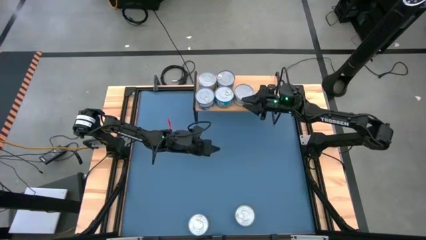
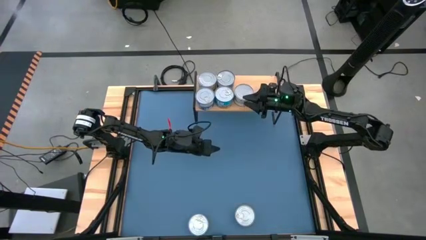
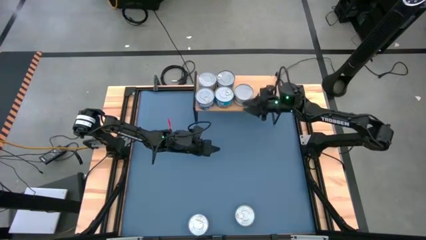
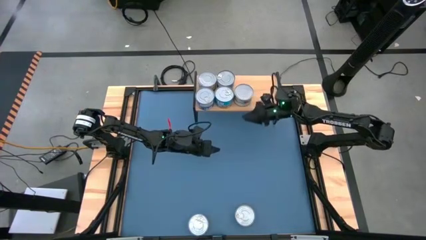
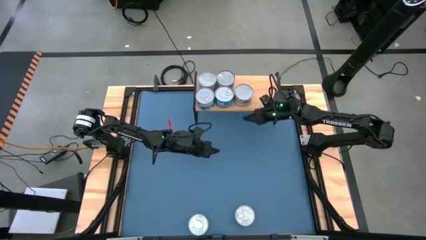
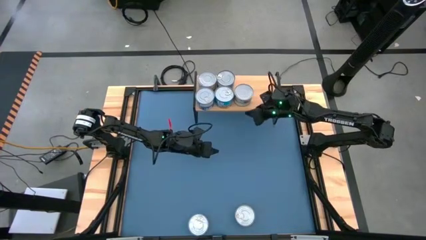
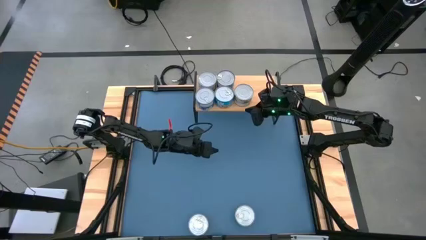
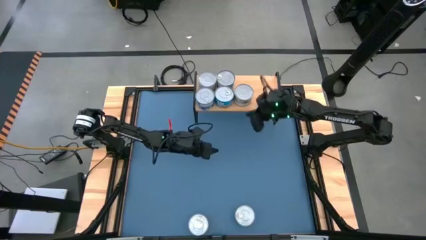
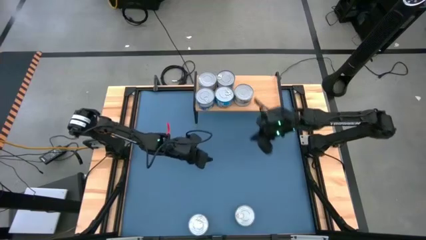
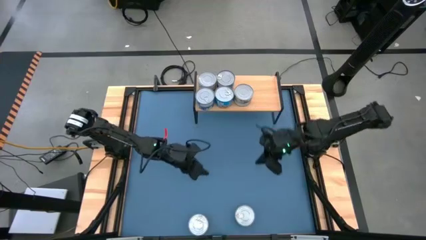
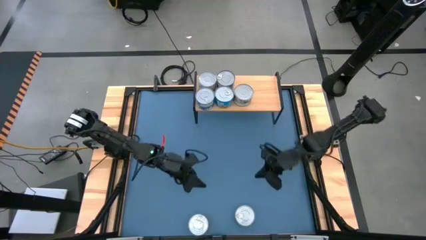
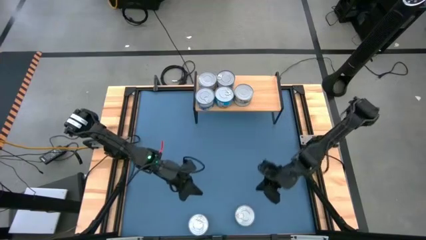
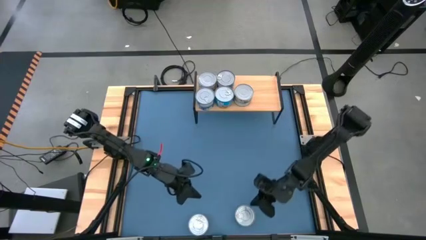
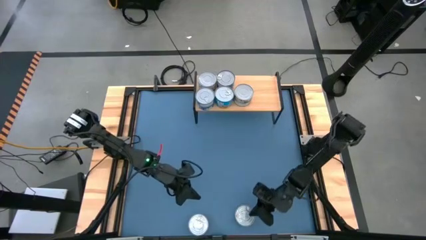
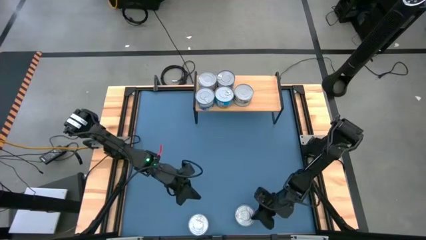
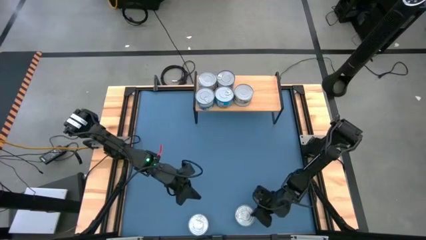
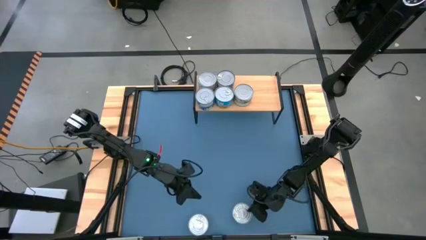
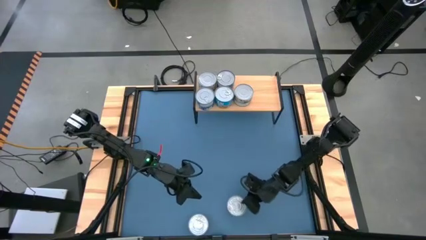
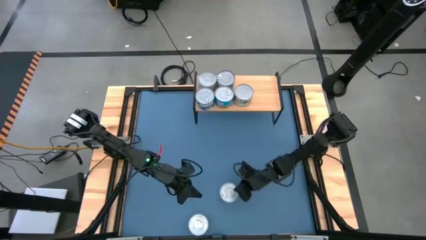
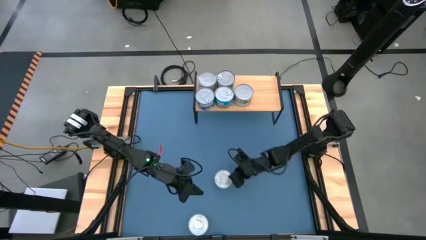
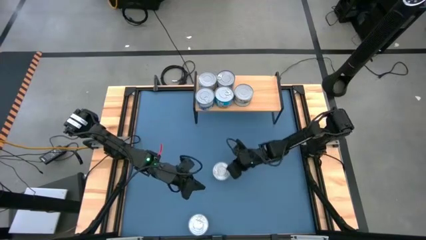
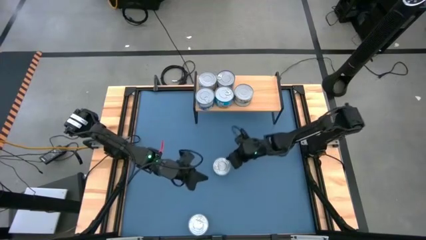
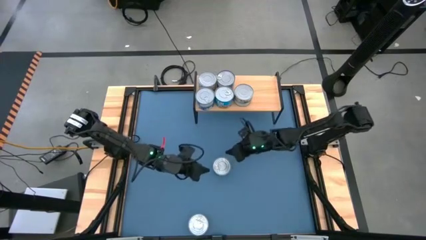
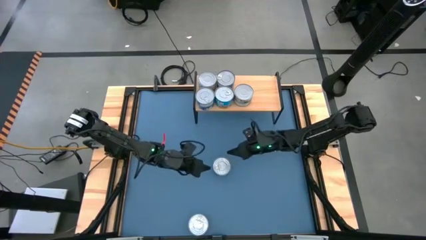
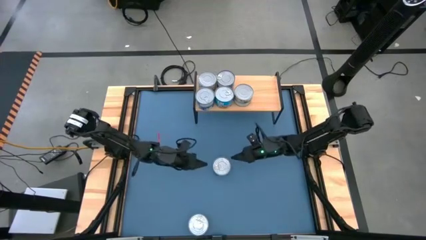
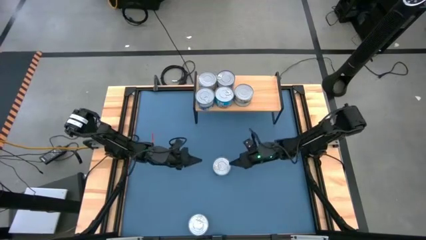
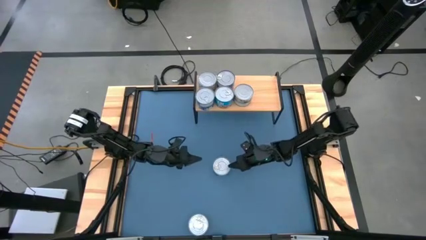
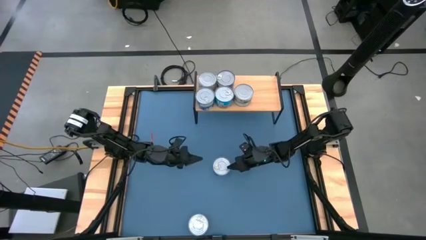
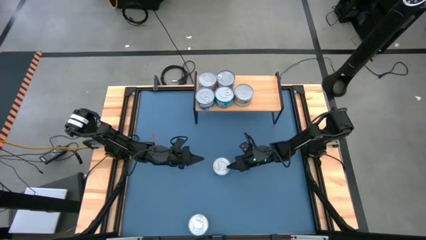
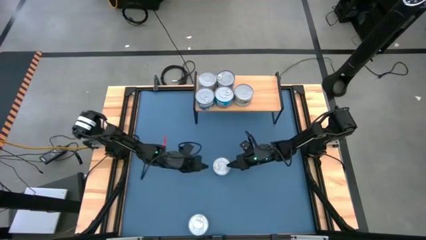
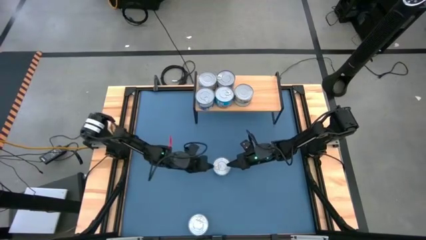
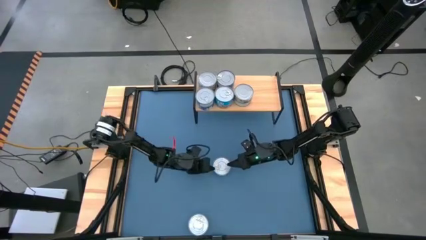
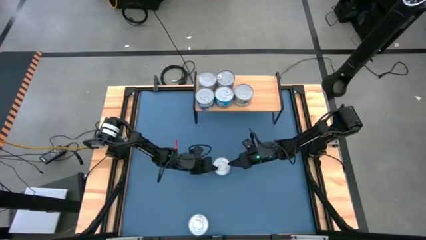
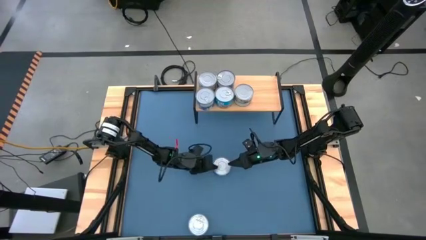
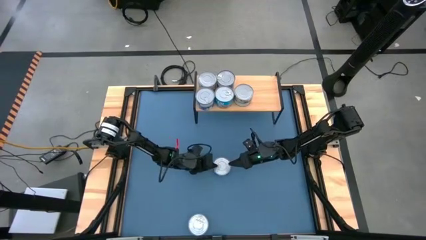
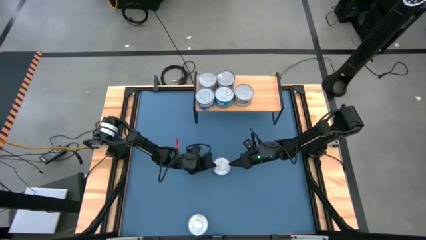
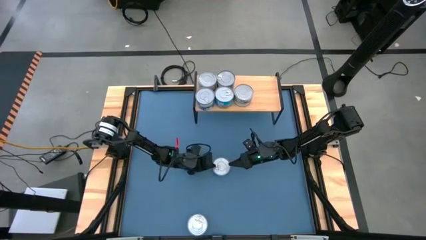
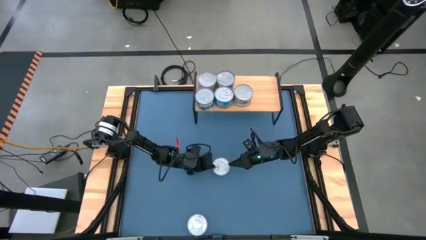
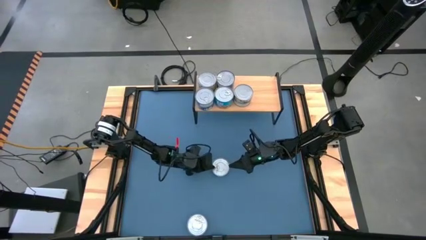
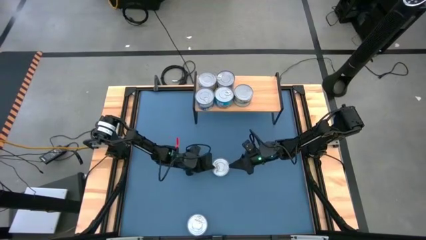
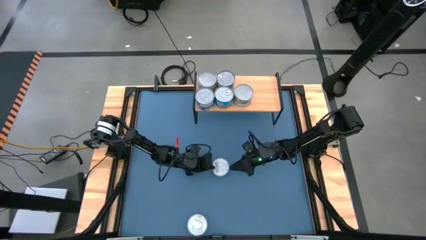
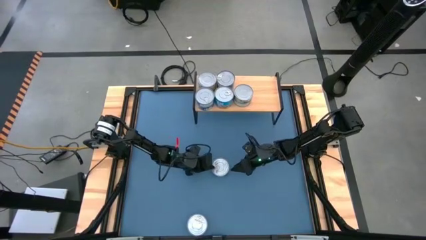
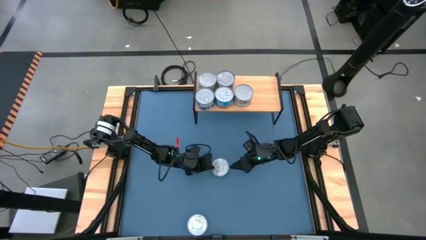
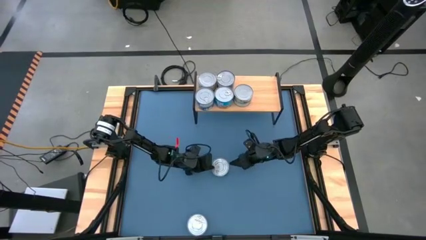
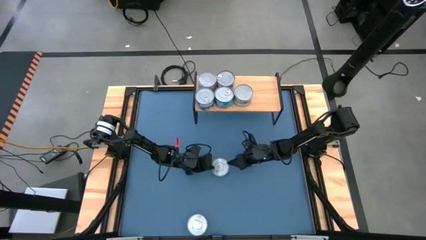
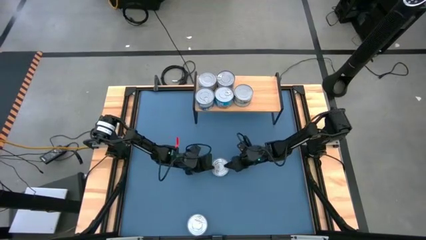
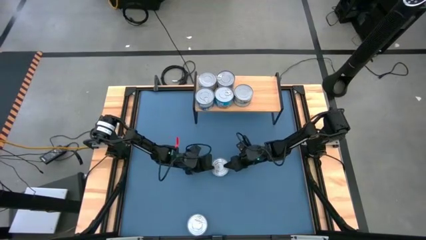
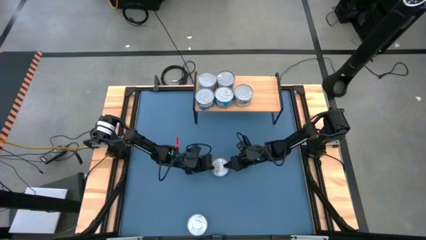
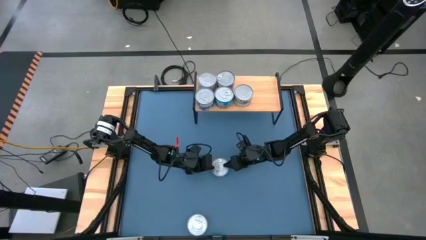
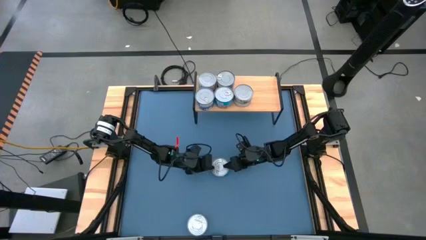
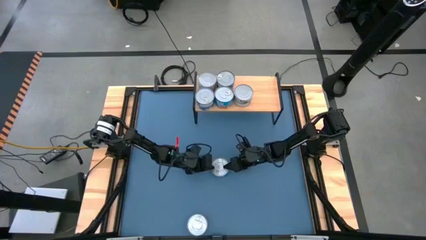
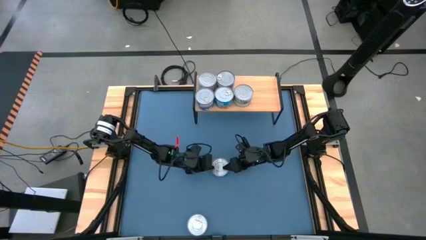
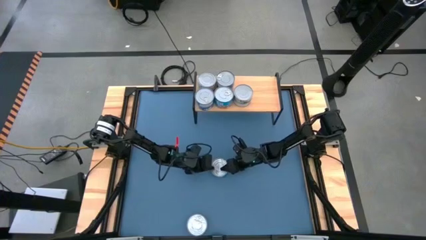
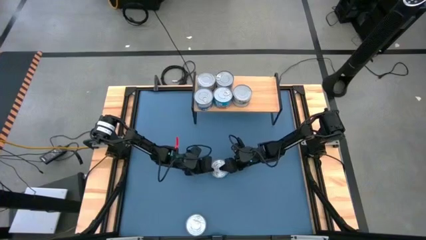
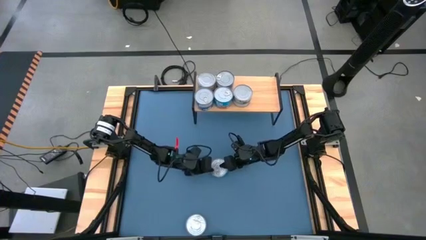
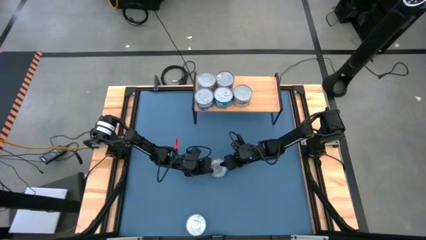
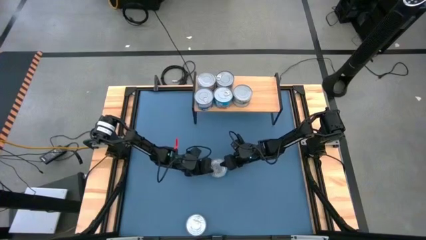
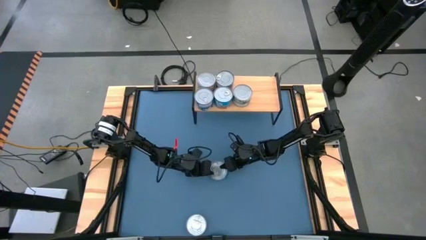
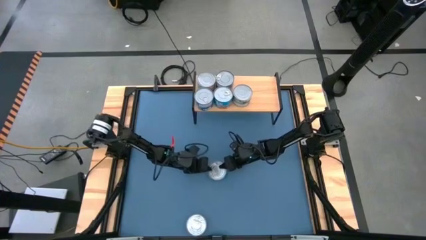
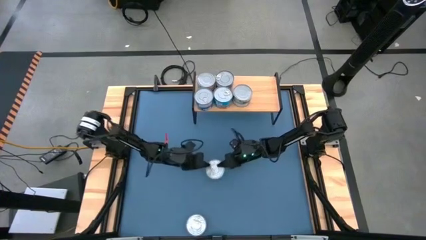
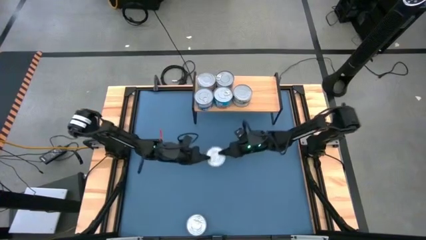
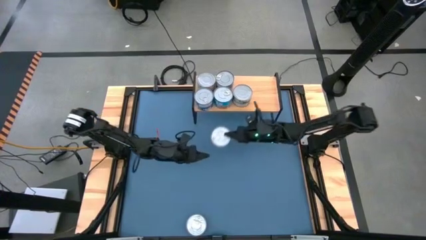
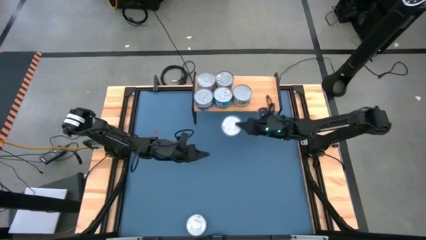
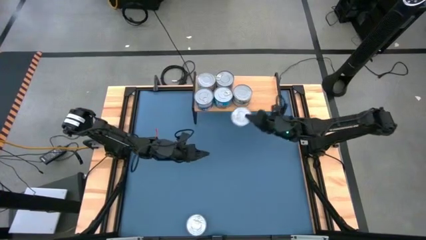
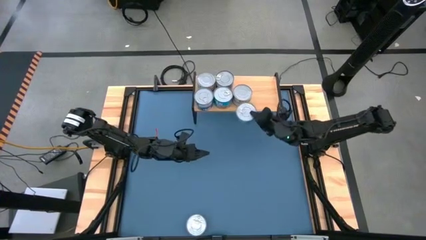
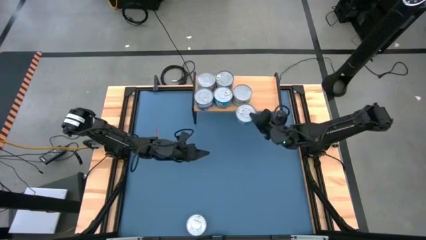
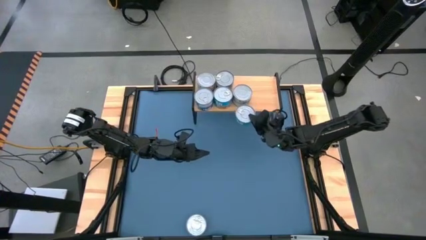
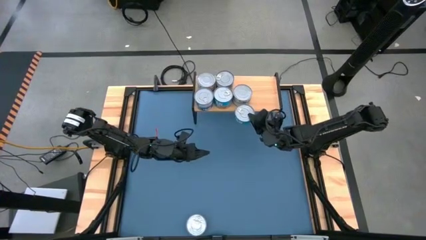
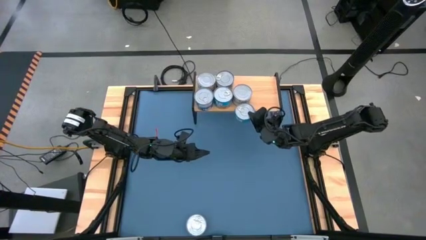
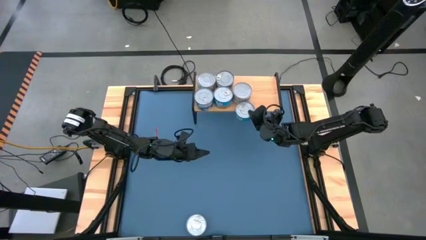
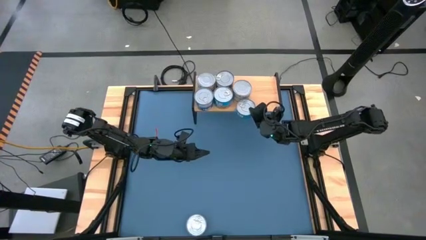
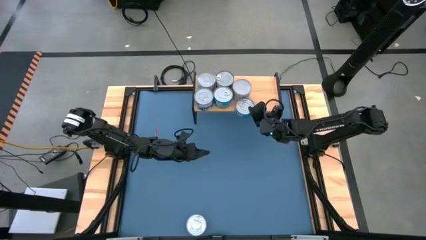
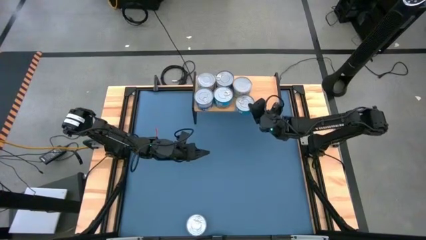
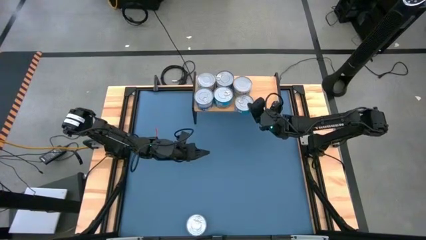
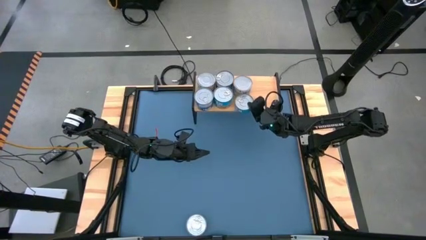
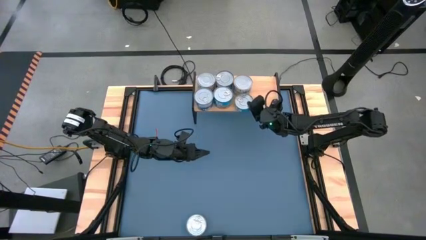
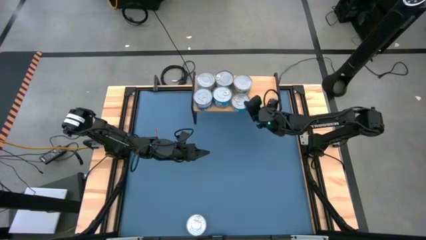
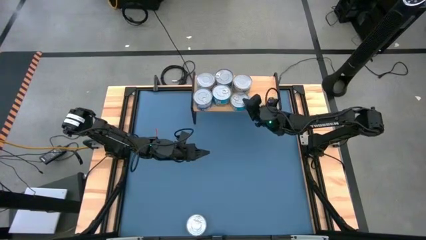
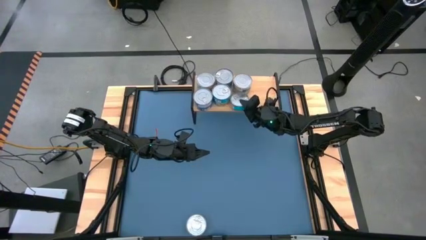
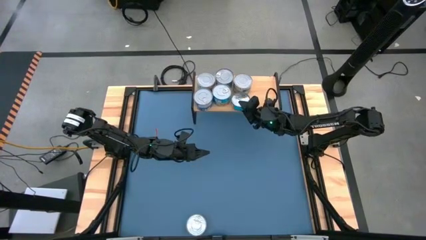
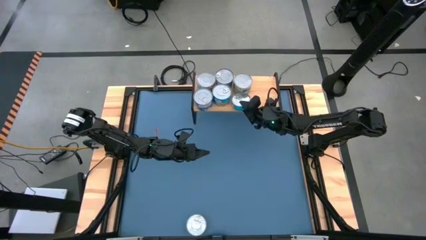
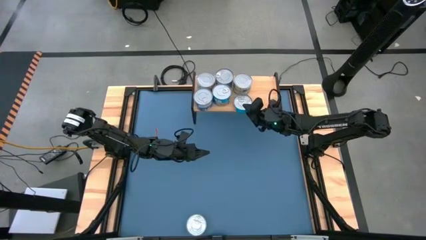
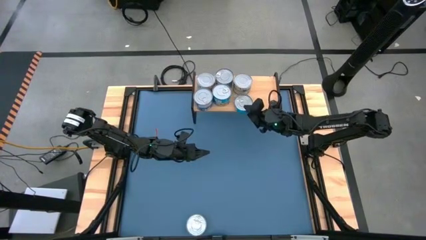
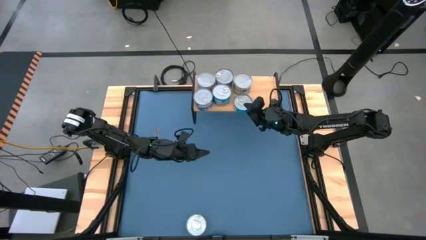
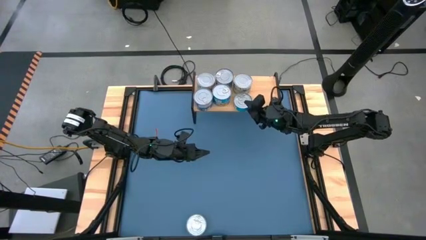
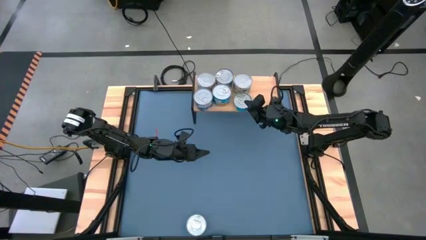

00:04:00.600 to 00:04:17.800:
Task: Stack canned seafood by type on shelf
Put the yellow blue tuna can on the shelf
